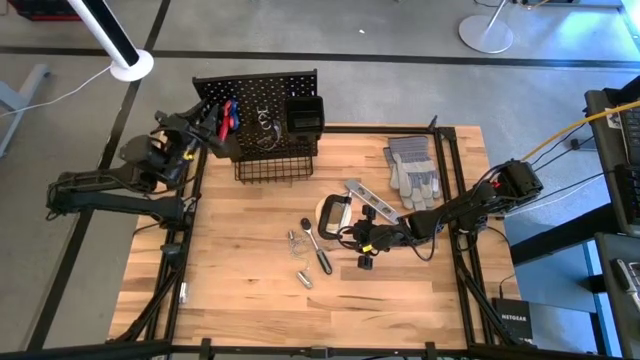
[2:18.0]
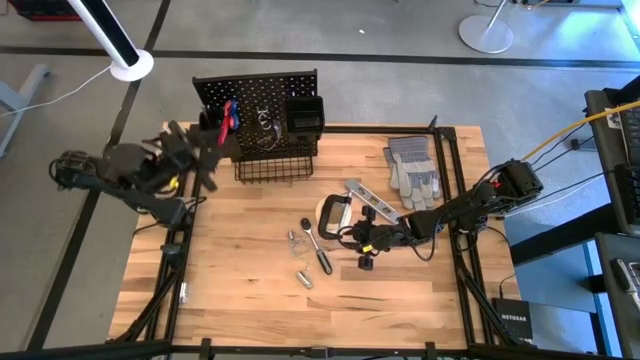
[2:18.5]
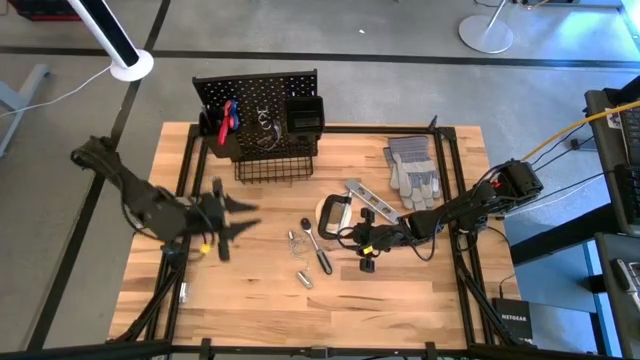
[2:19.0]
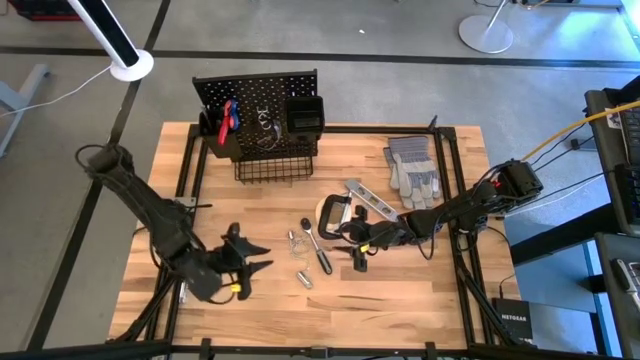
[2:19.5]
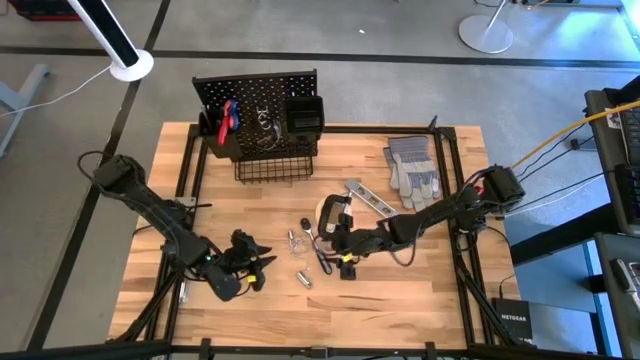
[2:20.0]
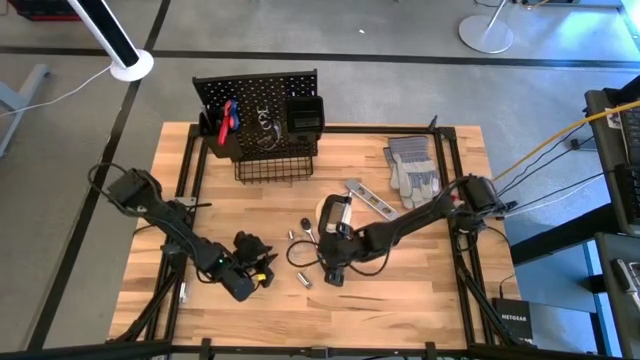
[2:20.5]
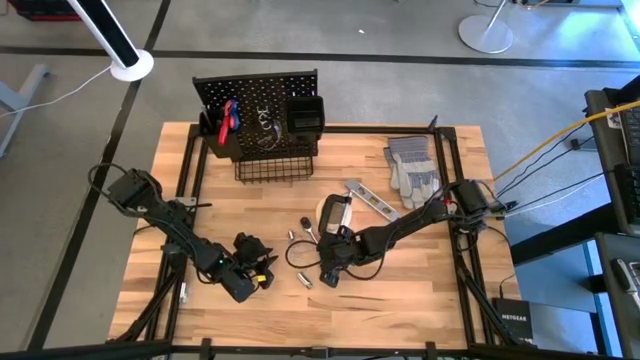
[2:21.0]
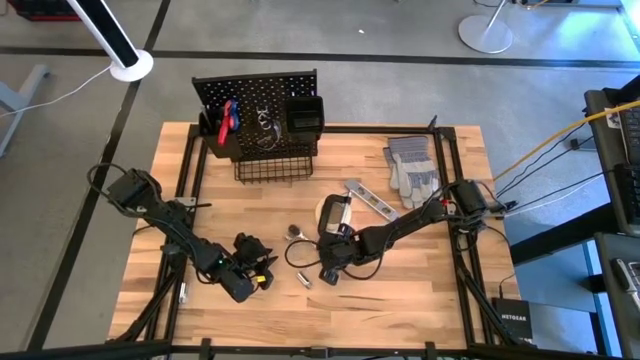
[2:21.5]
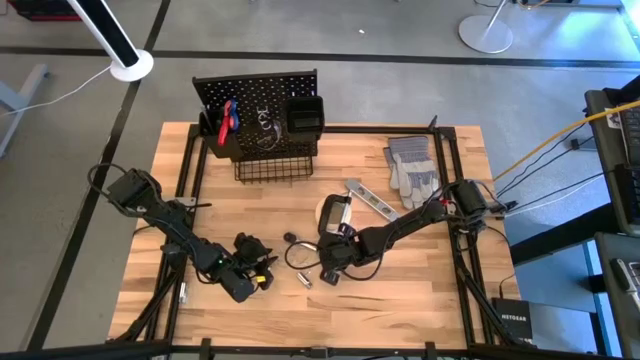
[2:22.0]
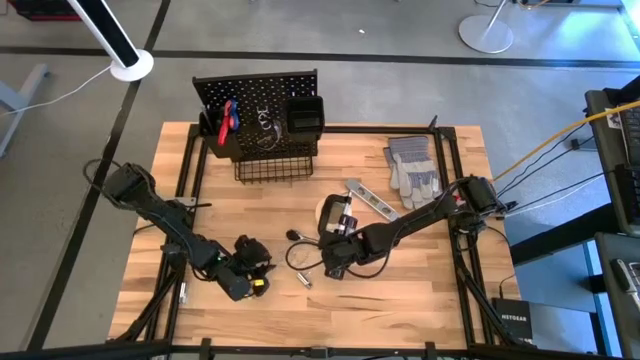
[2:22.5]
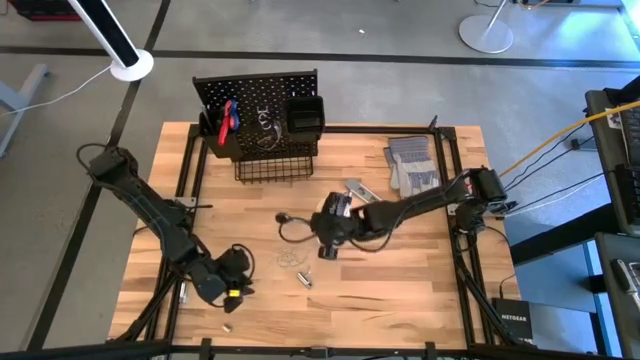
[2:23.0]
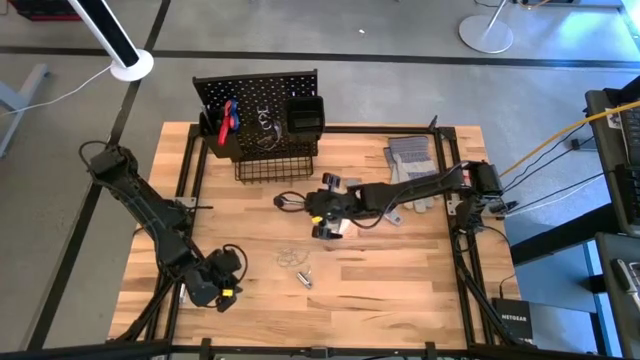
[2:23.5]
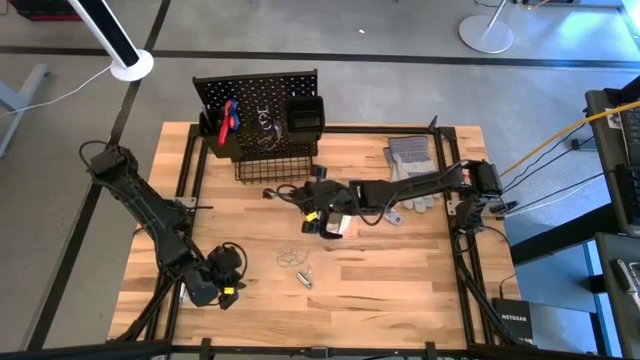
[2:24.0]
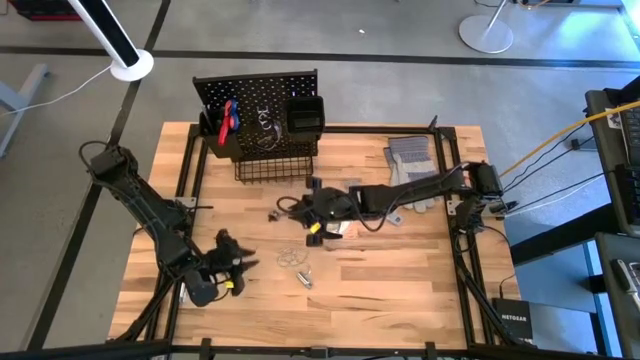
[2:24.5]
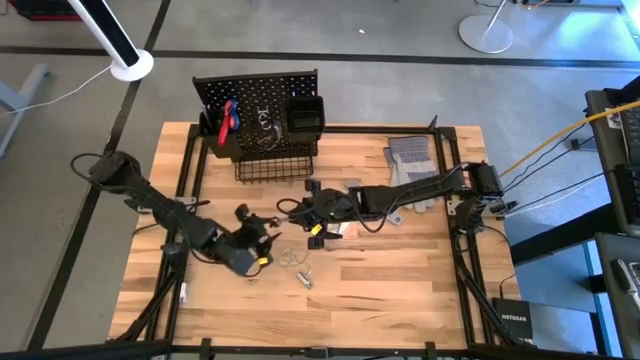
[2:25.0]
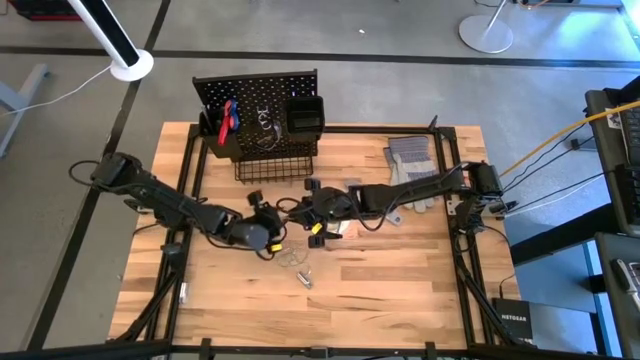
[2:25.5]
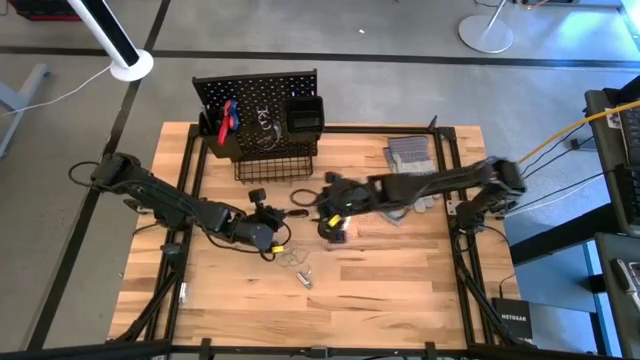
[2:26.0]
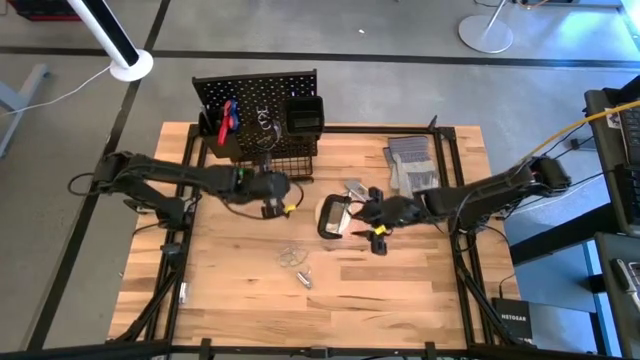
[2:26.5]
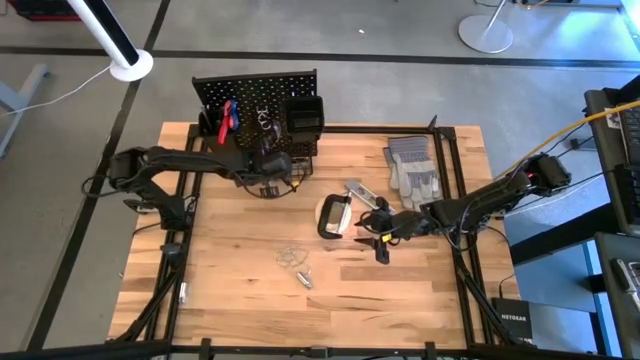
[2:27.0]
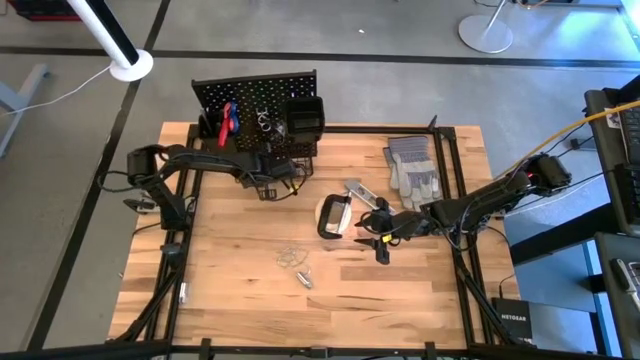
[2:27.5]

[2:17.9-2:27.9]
Task: Hang tools onto peg board
Put the ratchet wrench into the black wire basket on the pegboard

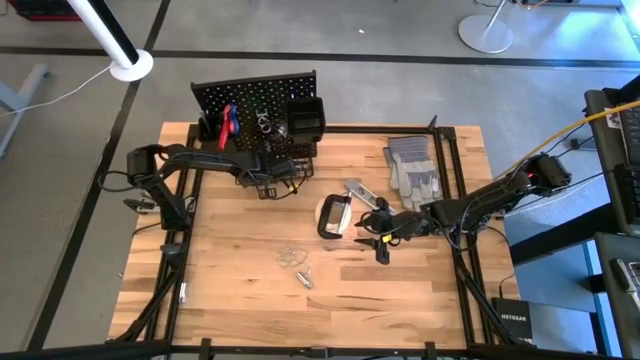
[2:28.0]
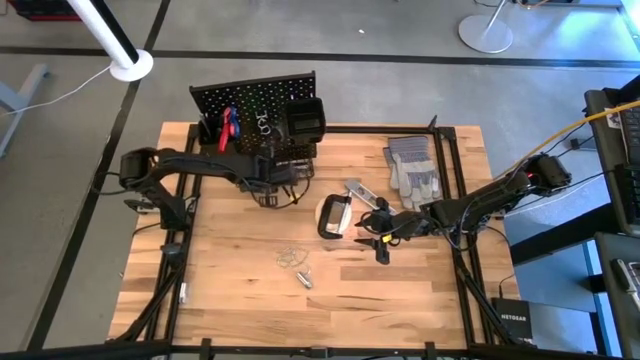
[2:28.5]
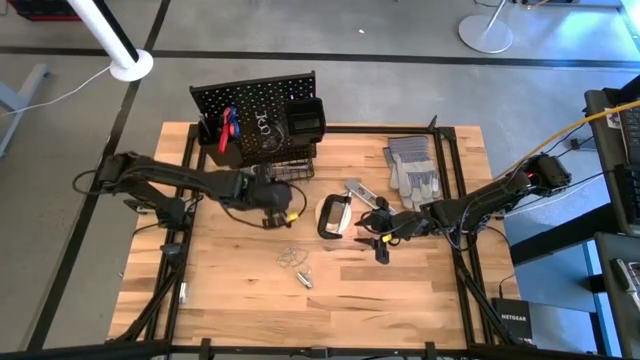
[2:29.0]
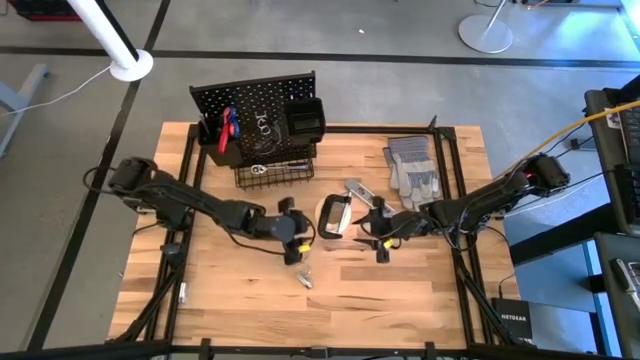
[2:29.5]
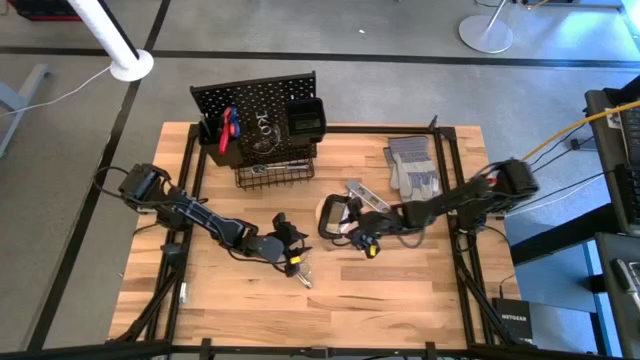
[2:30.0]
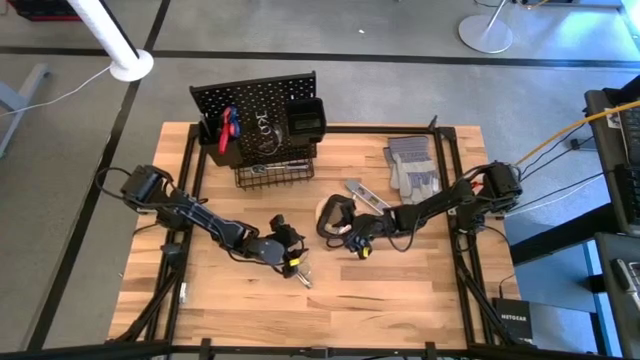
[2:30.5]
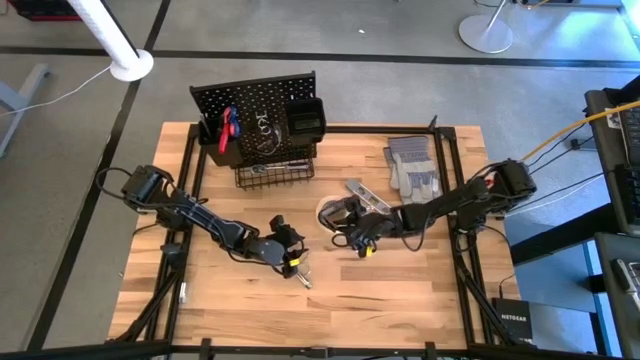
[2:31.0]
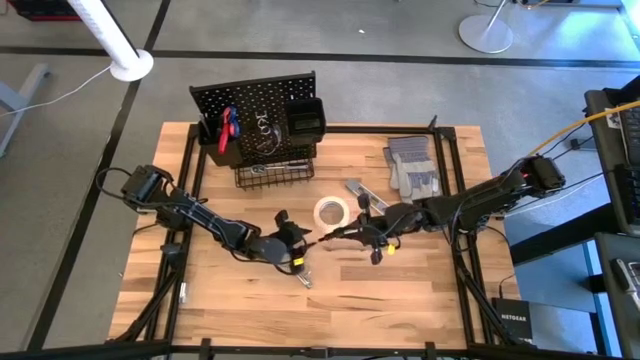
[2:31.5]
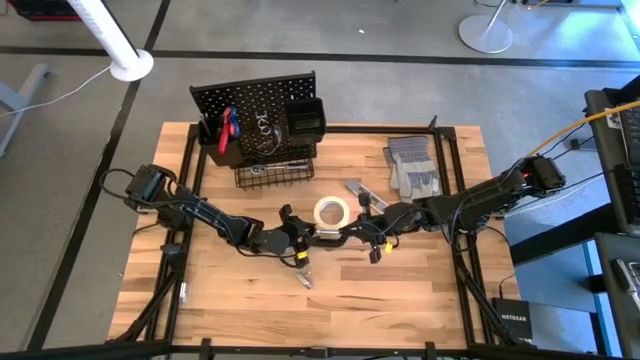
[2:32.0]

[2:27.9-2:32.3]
Put the clamp into the black wire basket on the pegboard

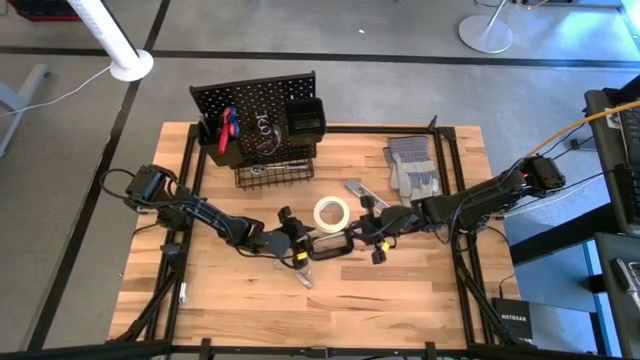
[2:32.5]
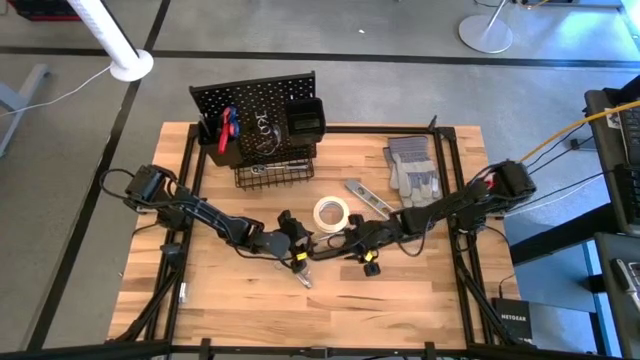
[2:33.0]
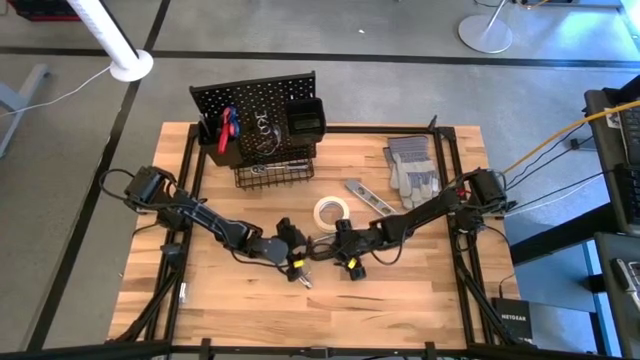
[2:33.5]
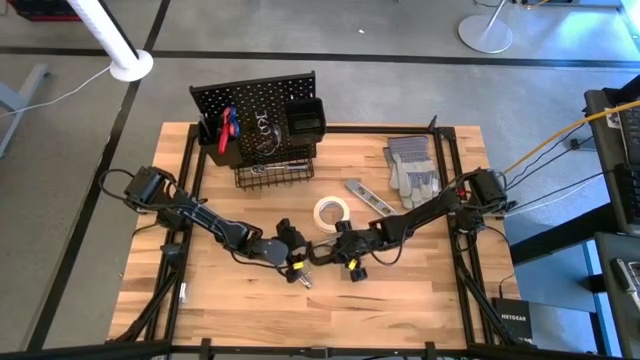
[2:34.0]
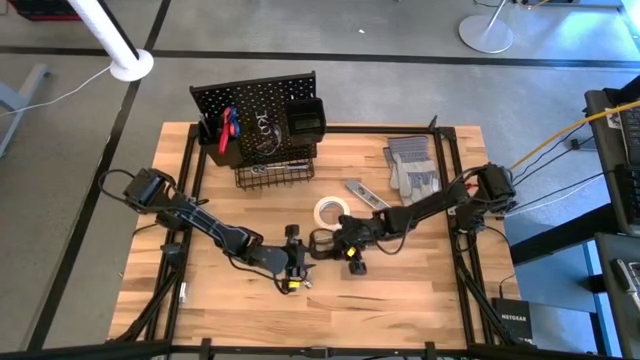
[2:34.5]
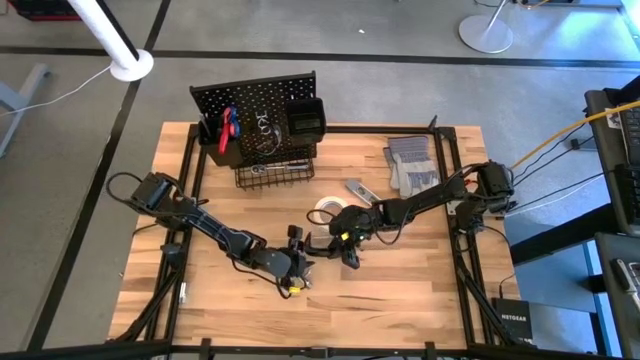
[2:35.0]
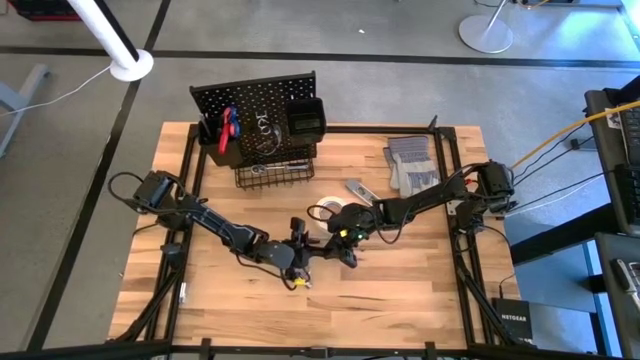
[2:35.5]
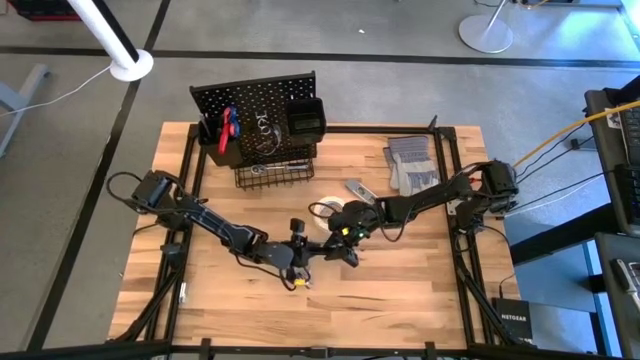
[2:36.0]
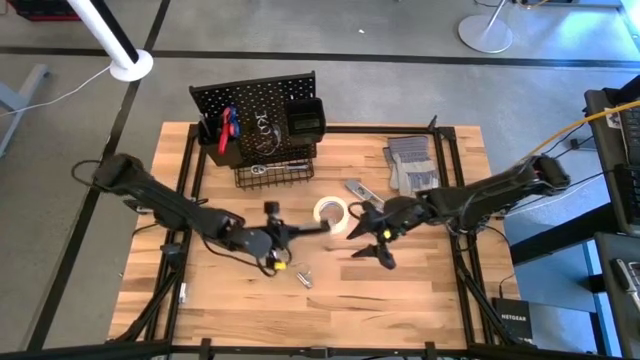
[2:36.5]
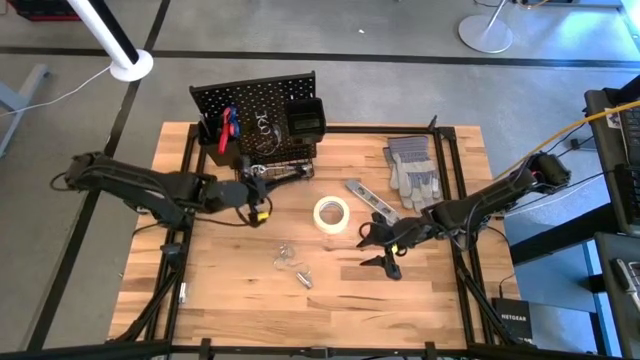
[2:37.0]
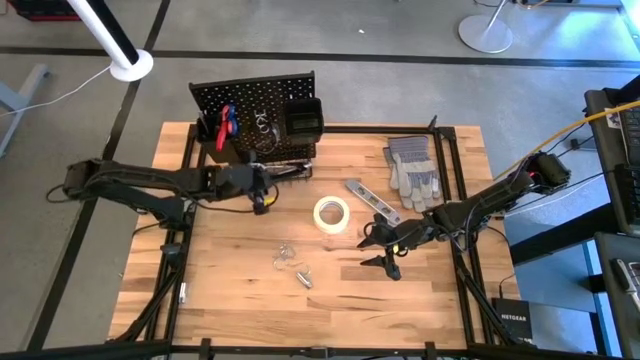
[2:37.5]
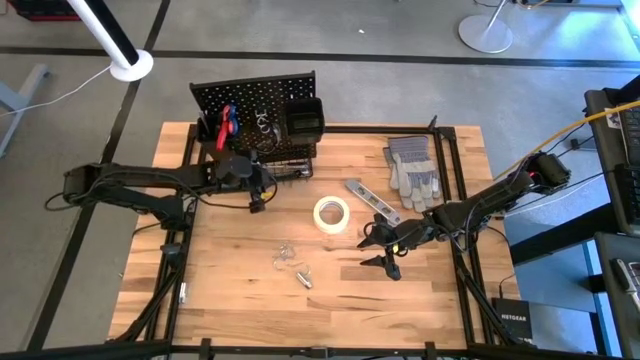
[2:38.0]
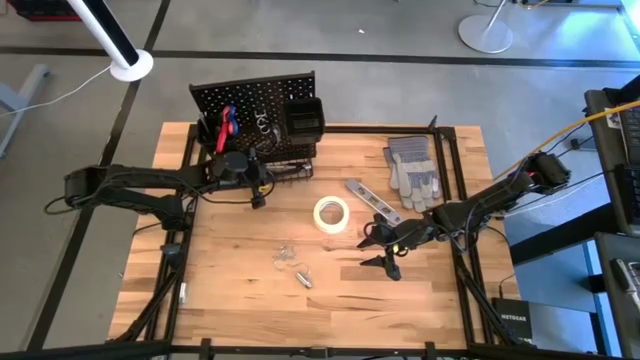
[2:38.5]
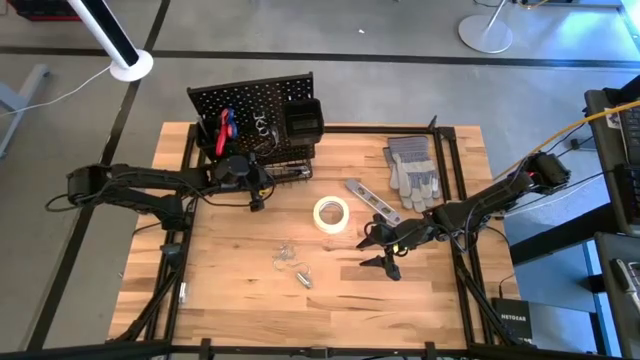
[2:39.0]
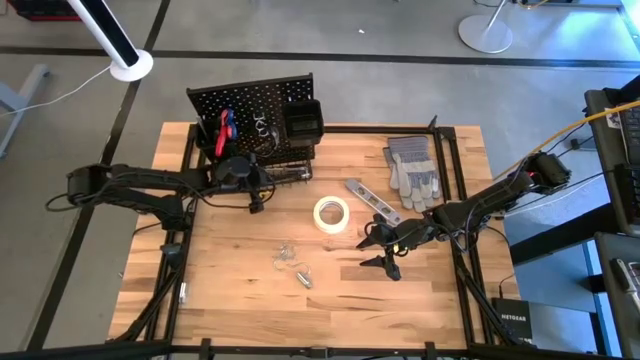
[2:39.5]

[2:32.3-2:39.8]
Put the clamp into the black wire basket on the pegboard

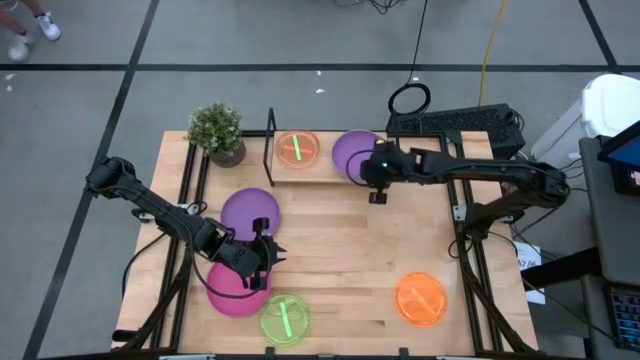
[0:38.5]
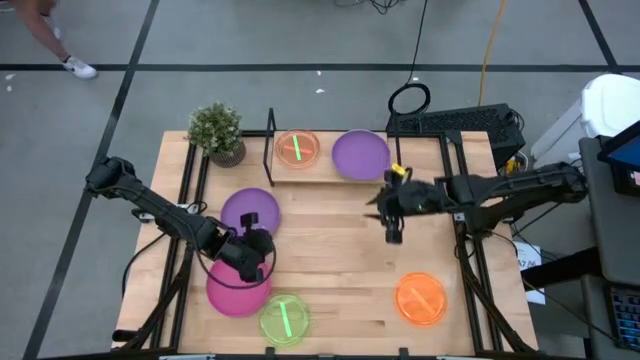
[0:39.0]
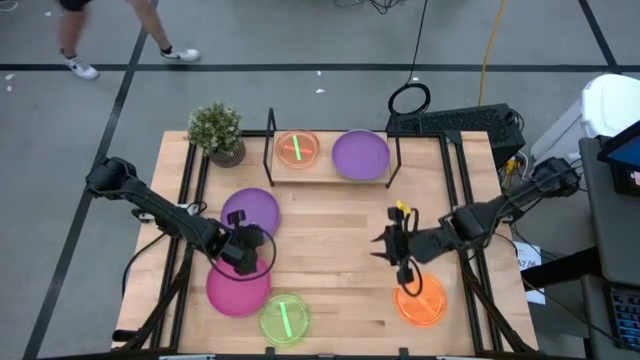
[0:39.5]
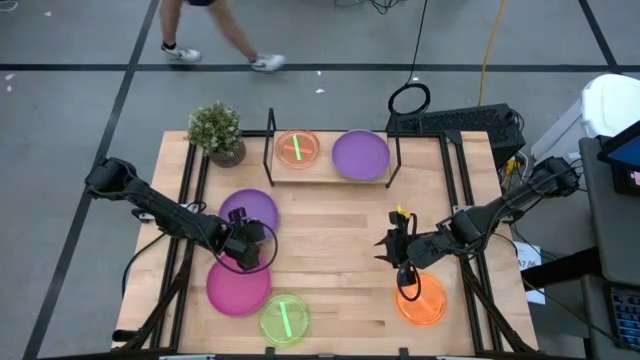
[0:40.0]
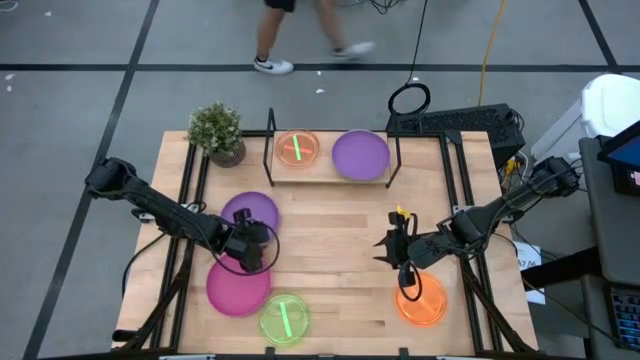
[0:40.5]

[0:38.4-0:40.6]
Task: Place and stack plates onto a shelf
Stack the purple plate on top of the purple plate
